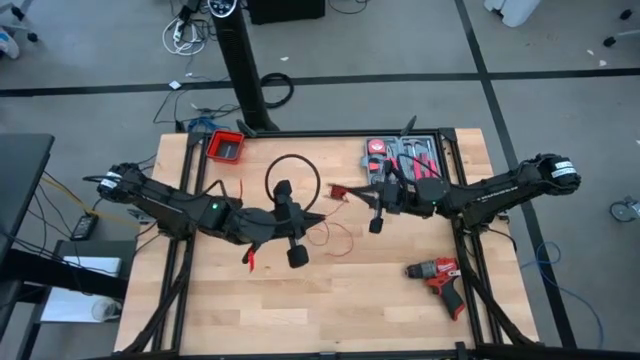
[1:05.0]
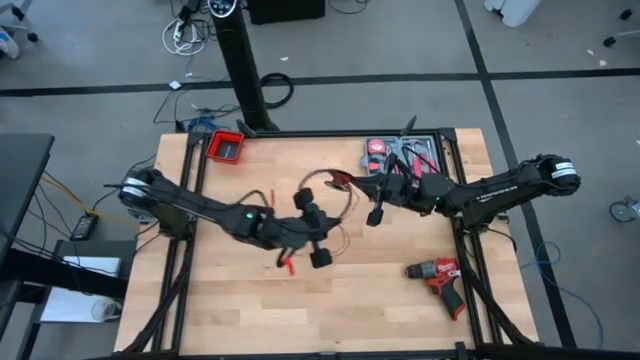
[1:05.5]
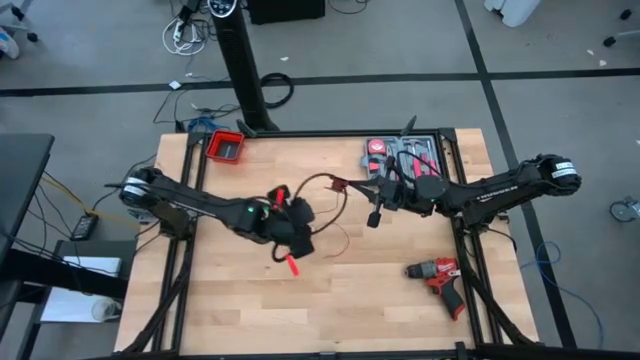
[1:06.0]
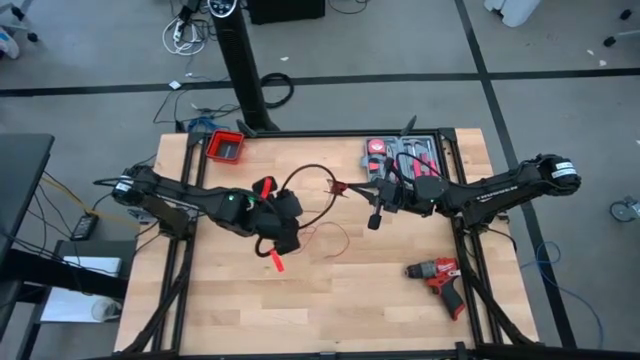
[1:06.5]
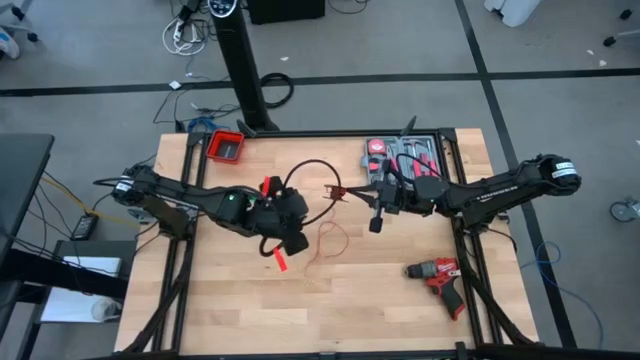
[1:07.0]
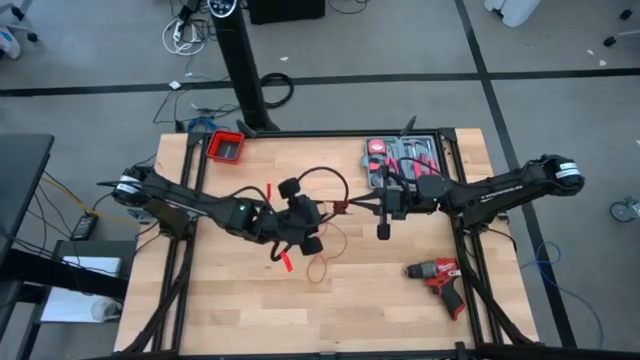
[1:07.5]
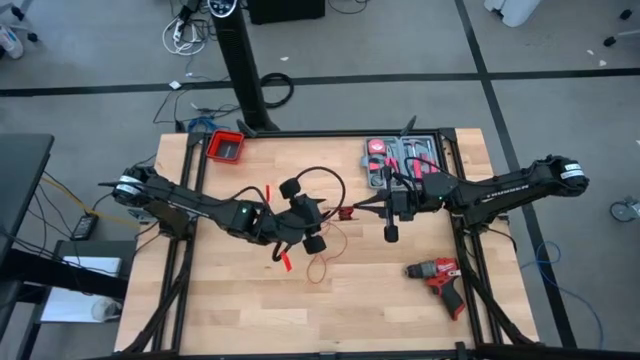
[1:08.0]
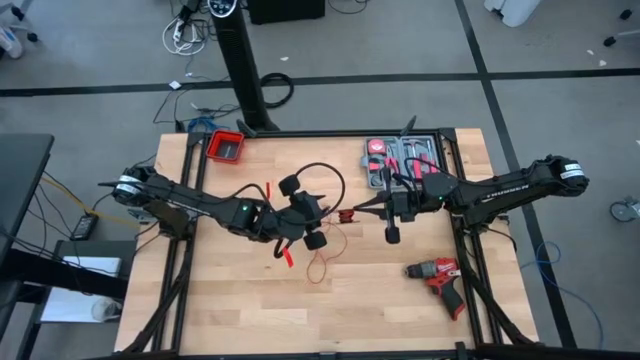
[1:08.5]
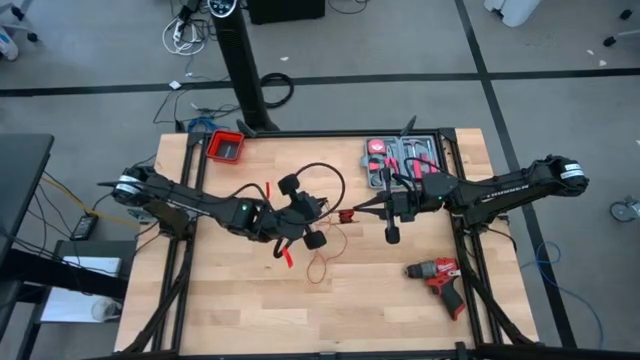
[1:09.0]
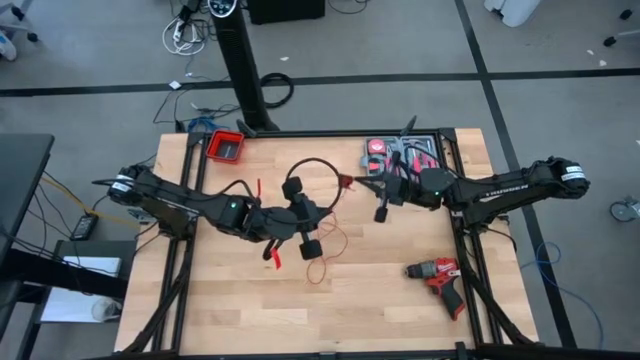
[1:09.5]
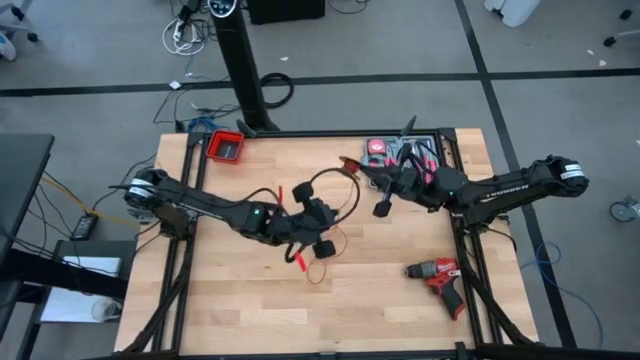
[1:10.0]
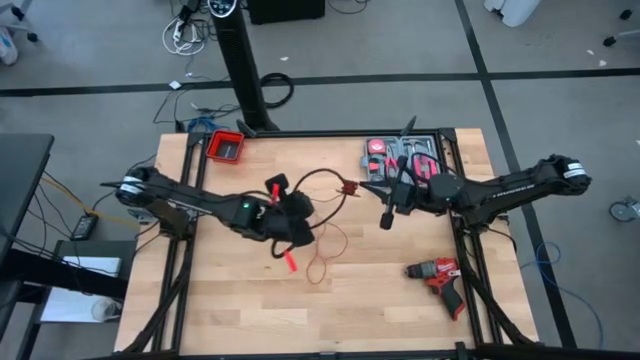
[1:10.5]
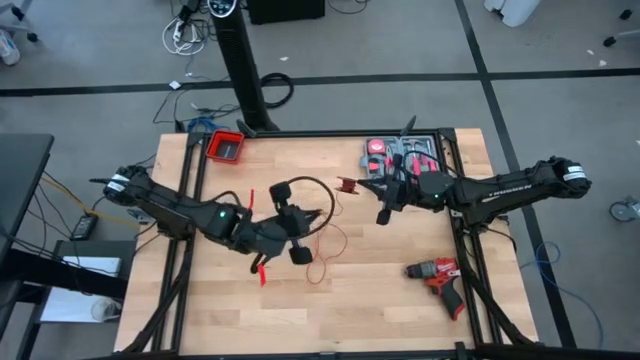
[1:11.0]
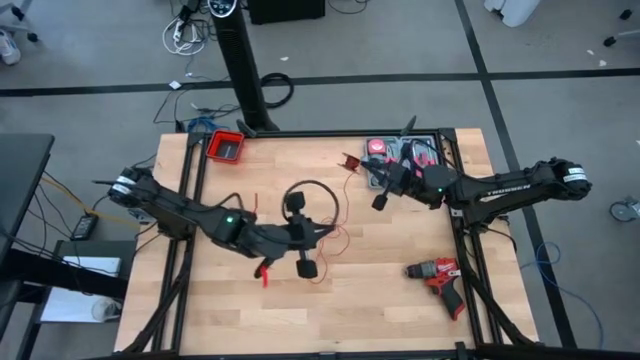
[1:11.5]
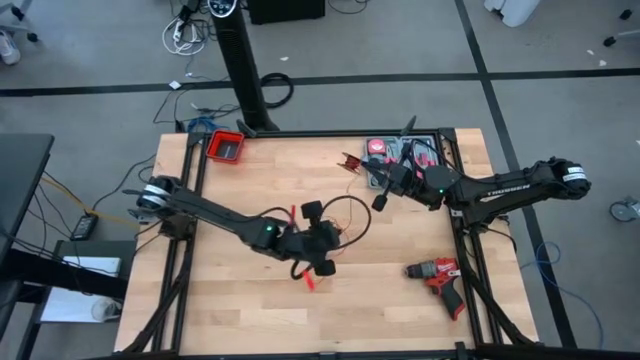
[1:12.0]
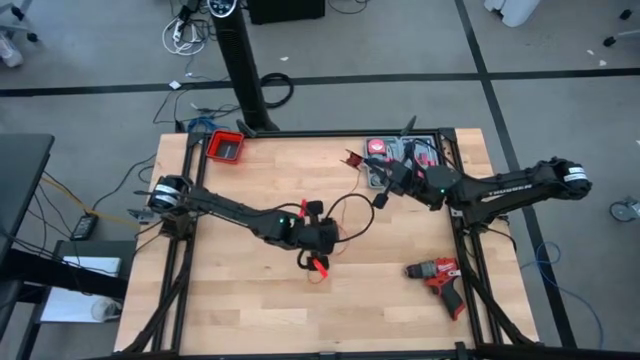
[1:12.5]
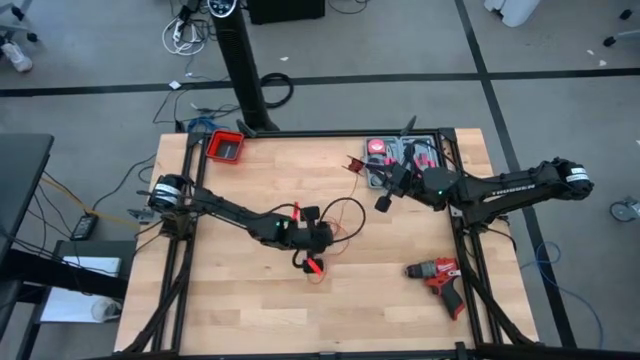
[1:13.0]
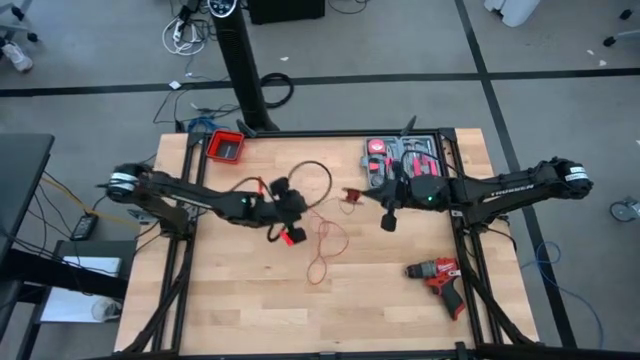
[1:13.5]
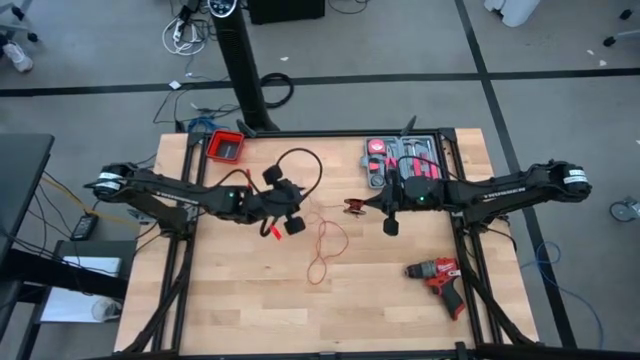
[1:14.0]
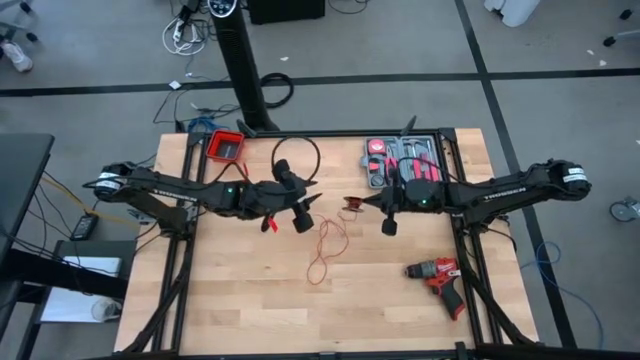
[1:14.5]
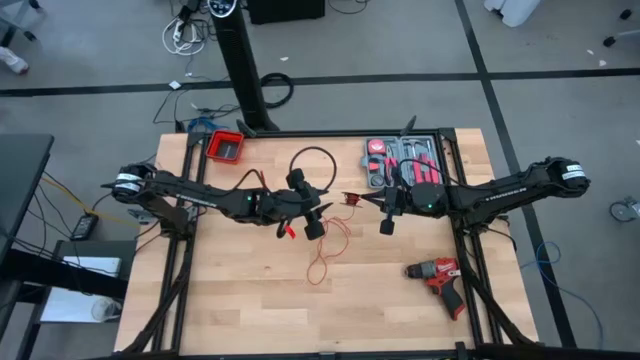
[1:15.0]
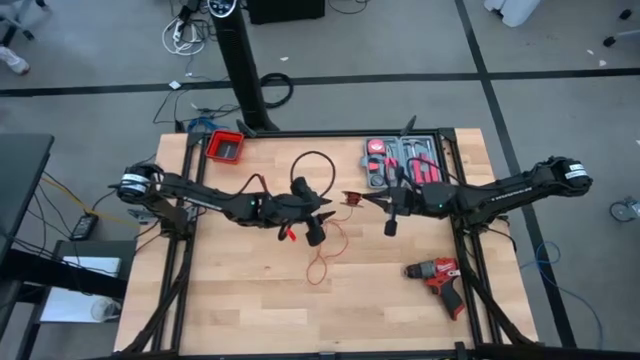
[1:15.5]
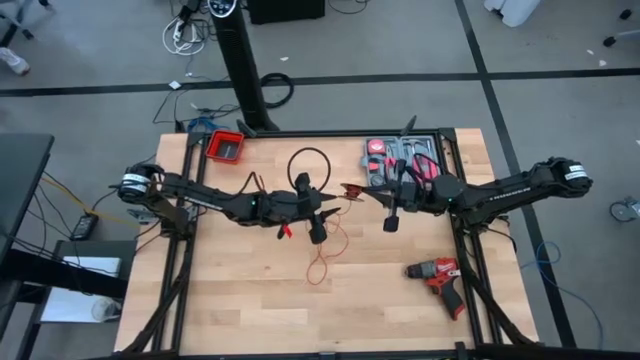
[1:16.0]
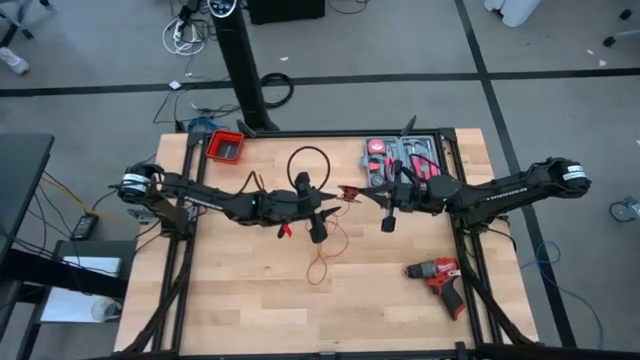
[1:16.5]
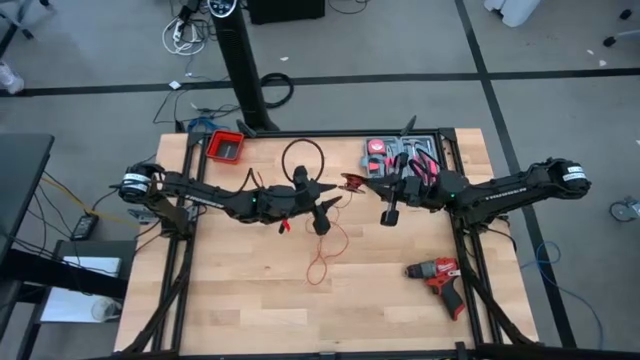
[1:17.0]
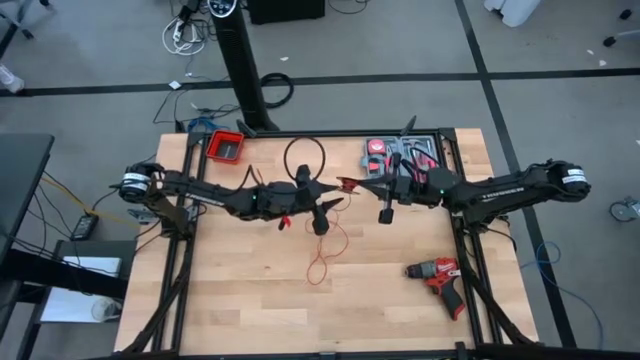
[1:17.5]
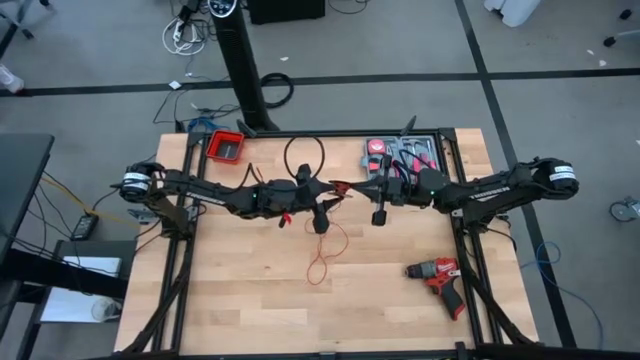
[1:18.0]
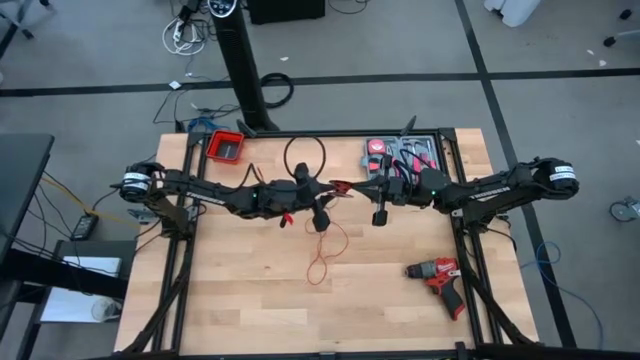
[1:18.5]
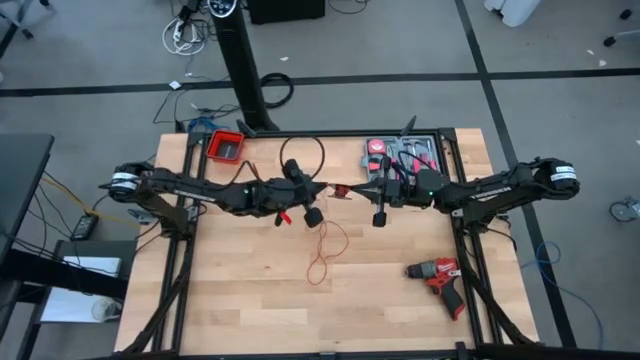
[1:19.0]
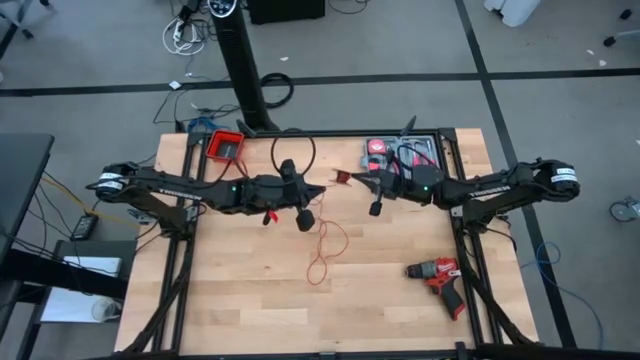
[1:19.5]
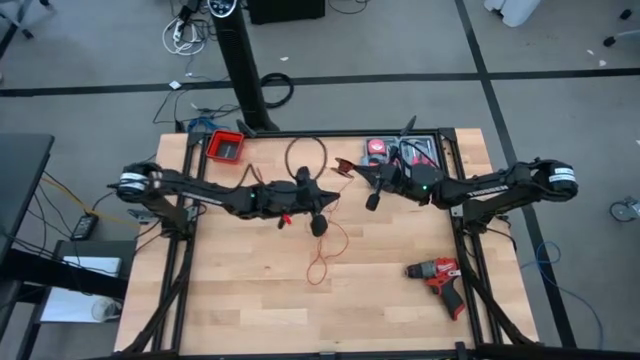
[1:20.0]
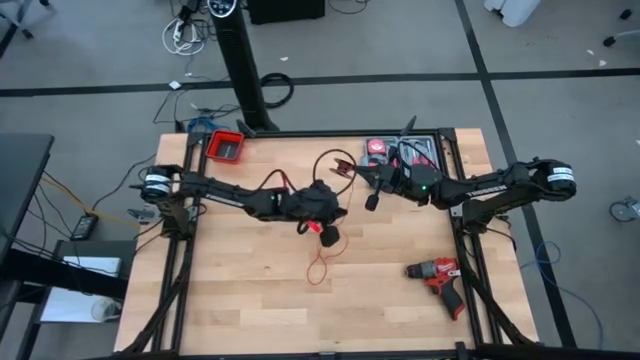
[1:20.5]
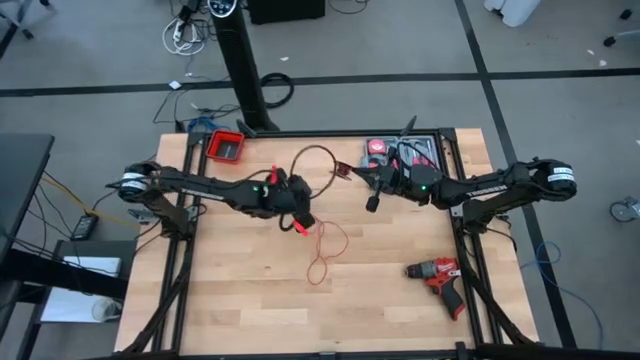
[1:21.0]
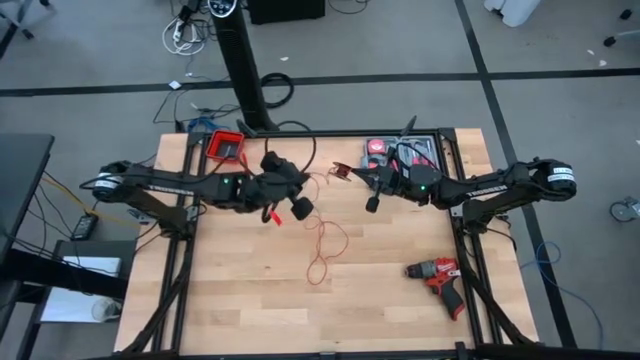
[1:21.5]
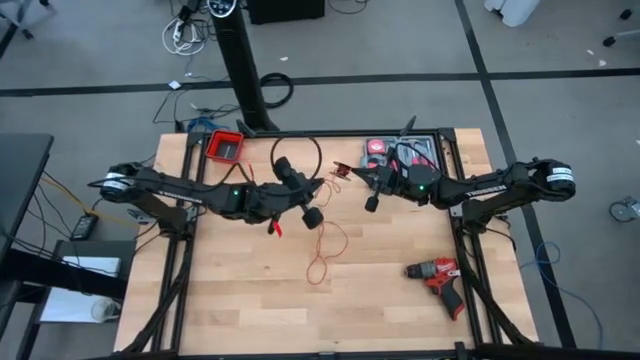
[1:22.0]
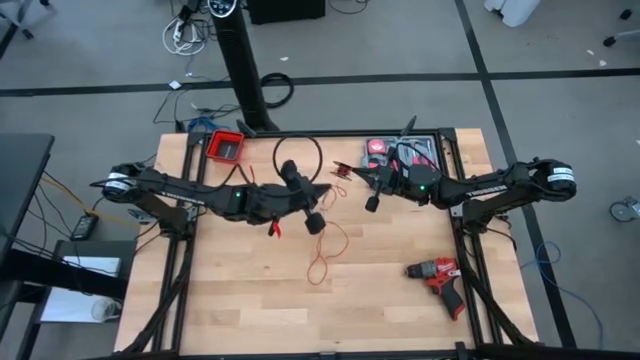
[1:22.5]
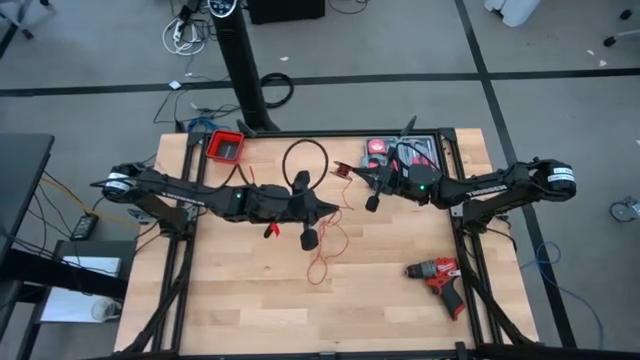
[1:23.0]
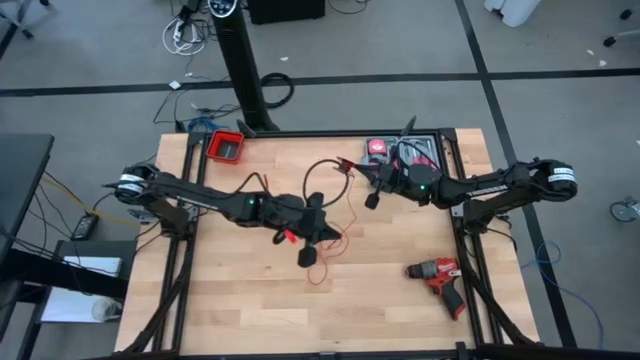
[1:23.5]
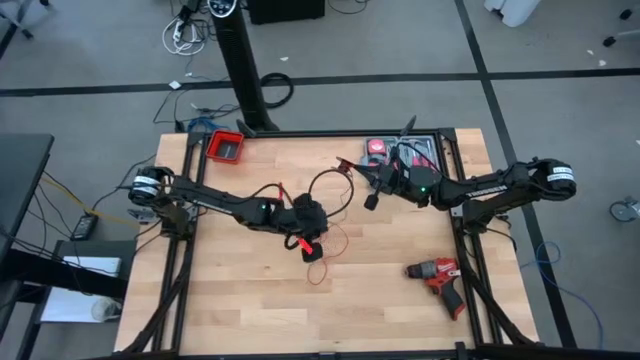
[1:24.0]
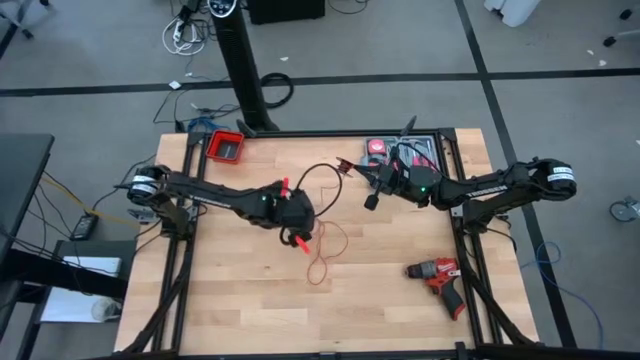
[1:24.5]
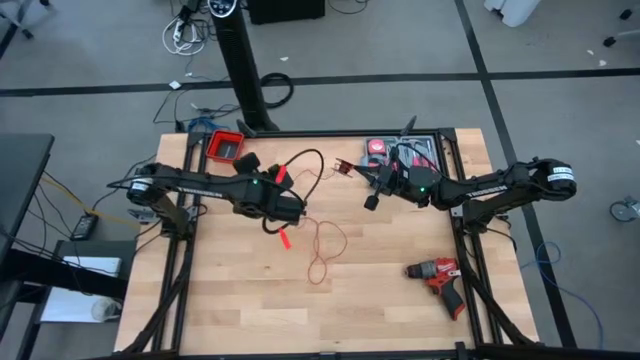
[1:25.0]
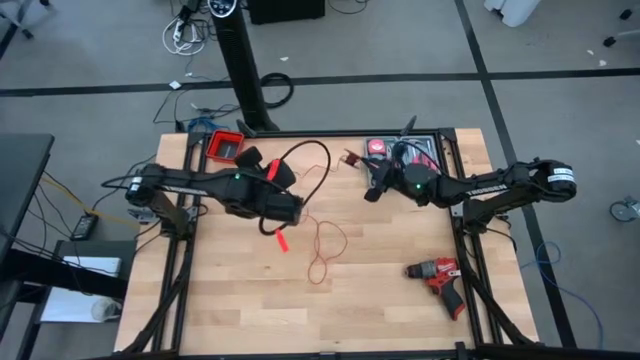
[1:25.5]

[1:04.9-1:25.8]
Task: Coil cords
Uncoil the red wire from the black spool
